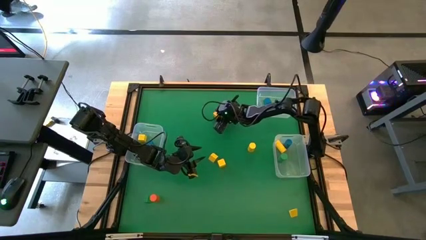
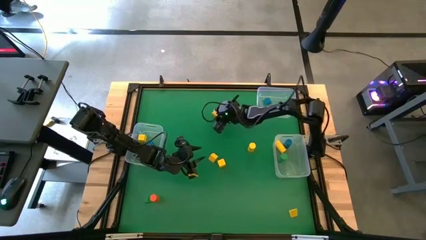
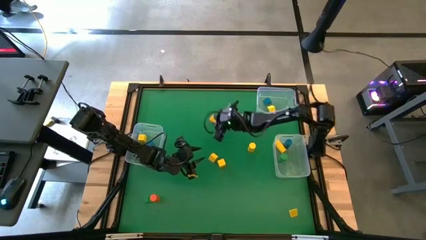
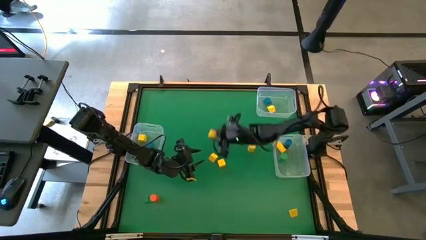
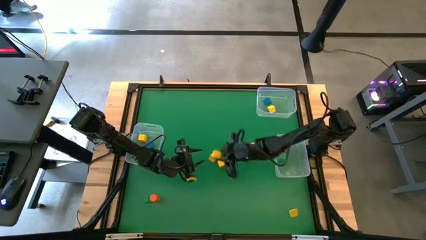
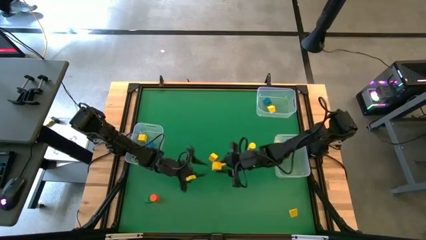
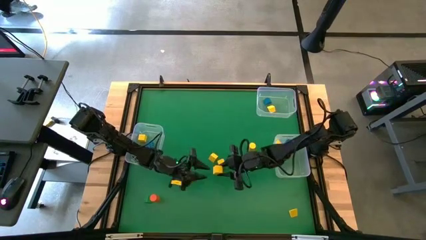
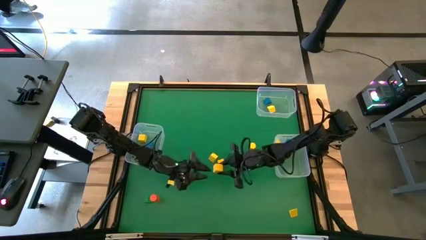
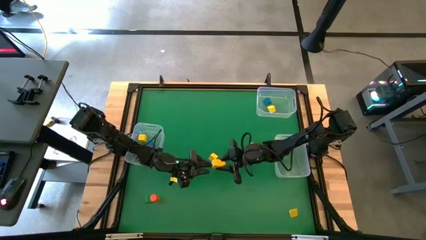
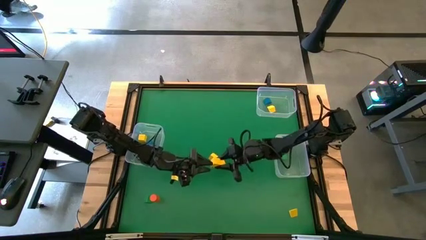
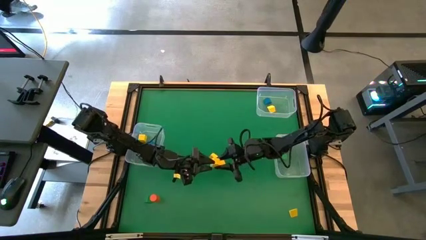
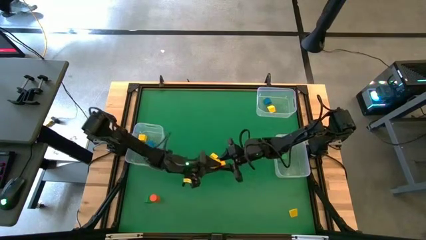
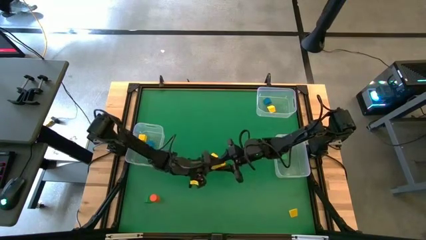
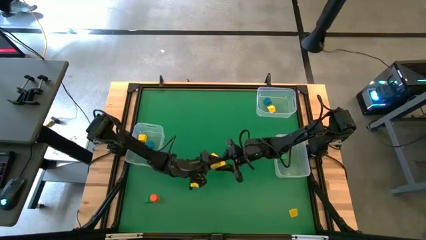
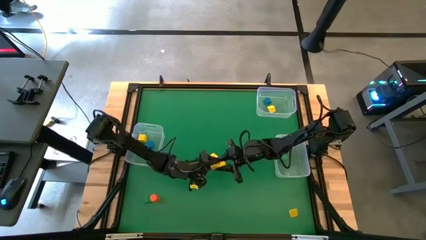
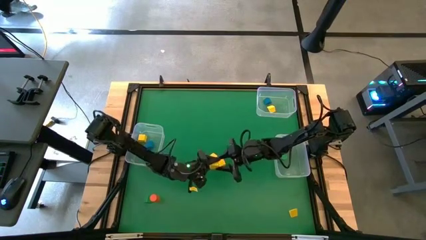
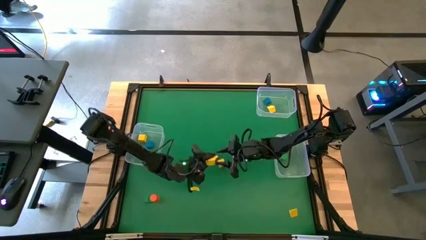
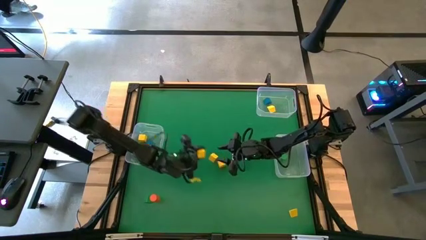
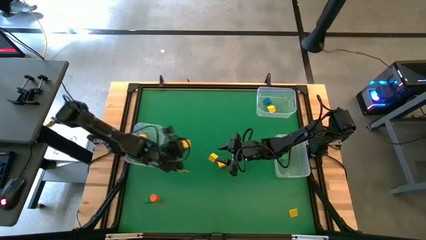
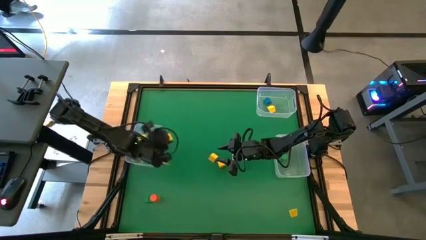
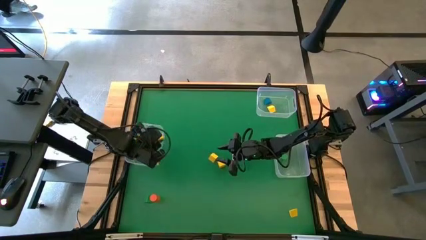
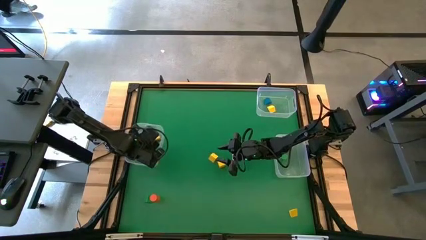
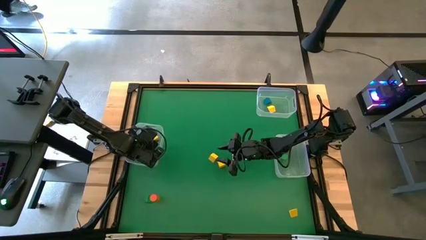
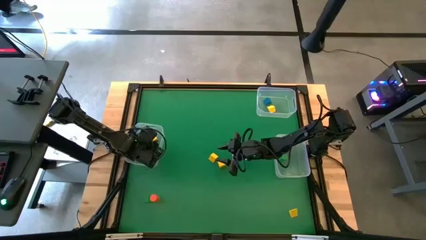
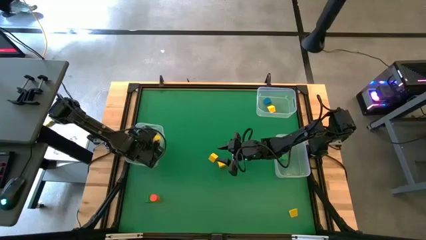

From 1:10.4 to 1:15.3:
Task: Sort blocks by size
Put the yellow square block into the left transparent bin

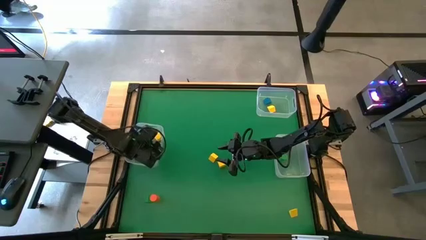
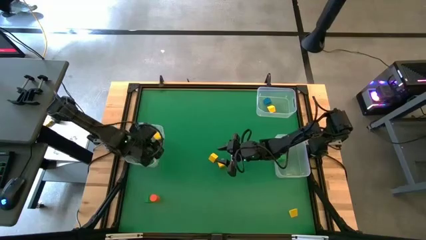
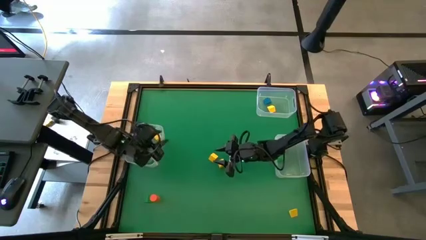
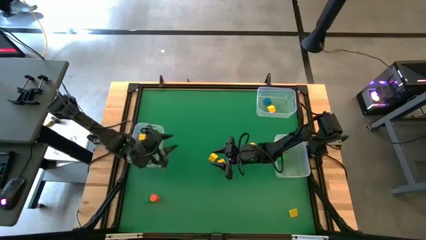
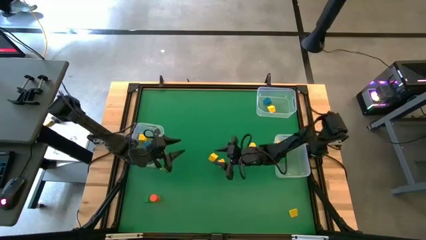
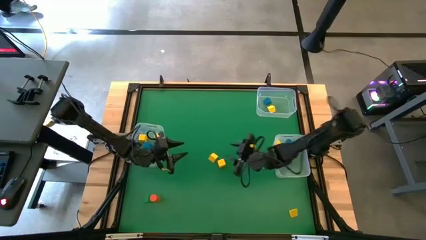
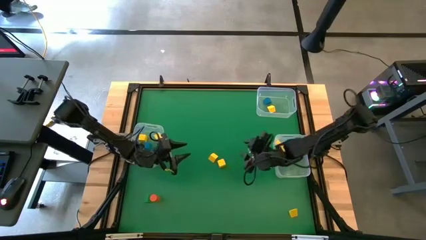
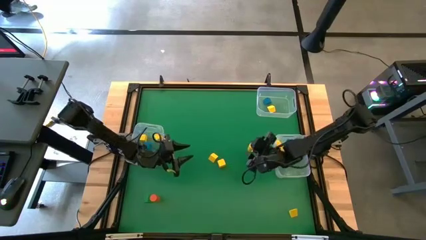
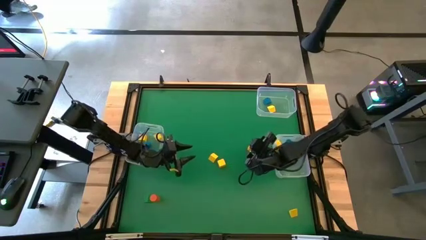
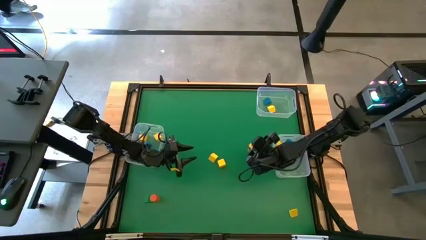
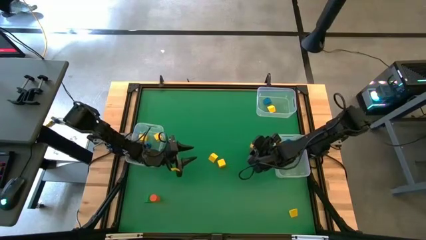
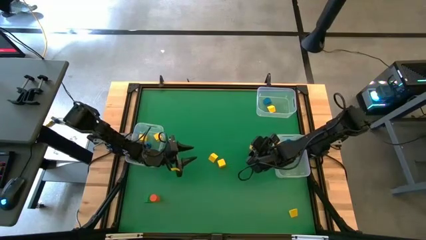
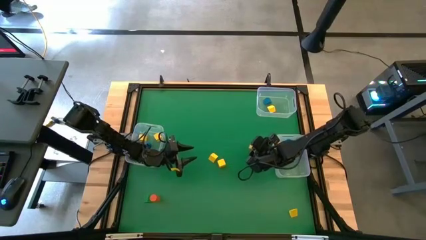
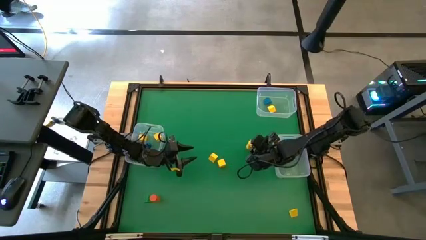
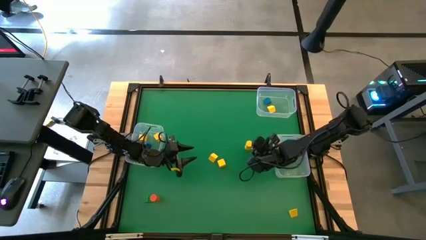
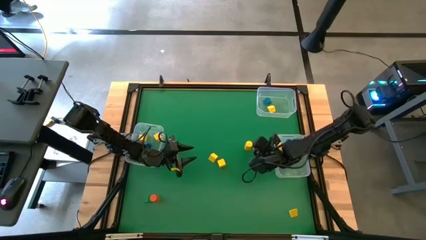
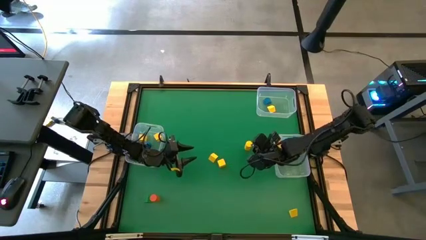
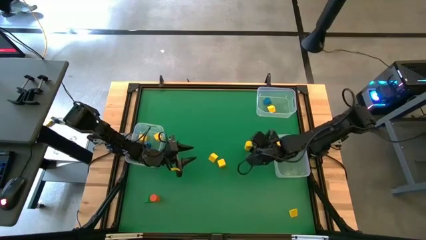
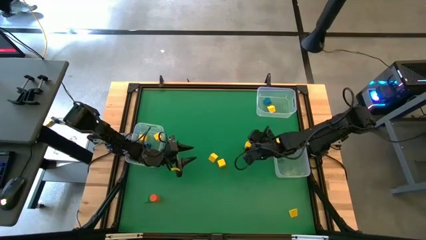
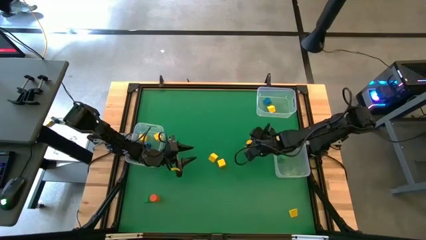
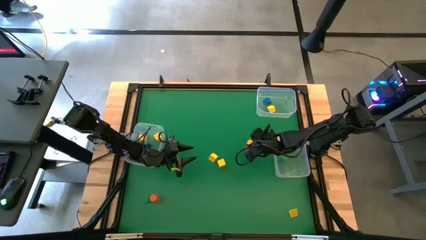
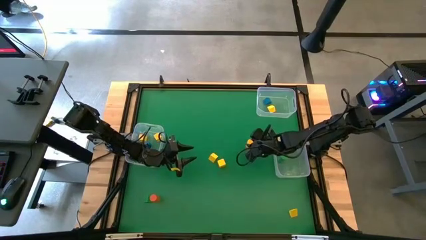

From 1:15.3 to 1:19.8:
Put the yellow cylindrical block into the bottom right transparent bin

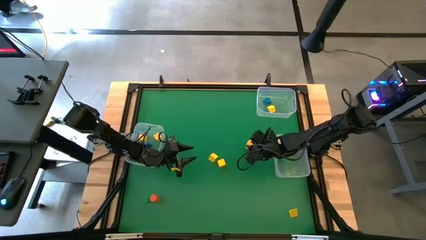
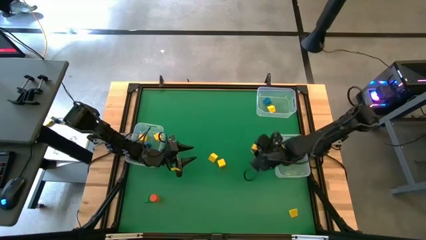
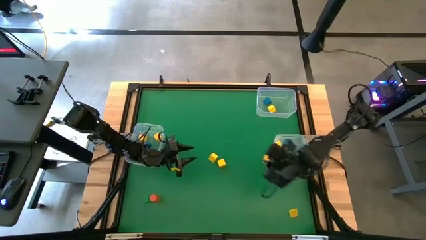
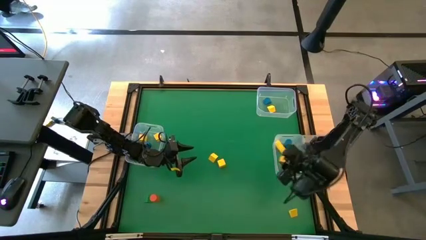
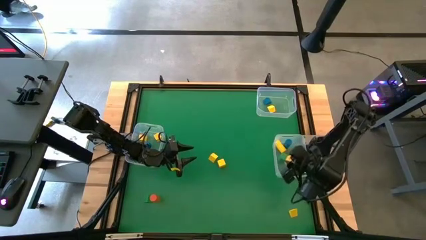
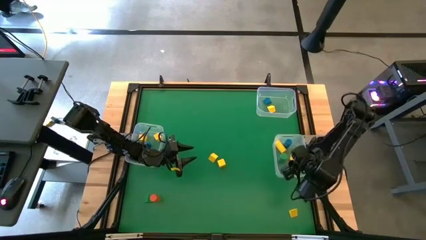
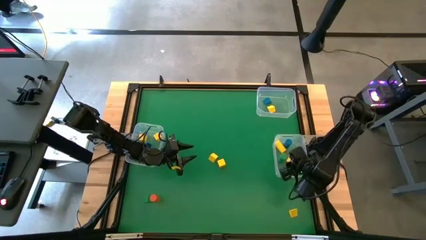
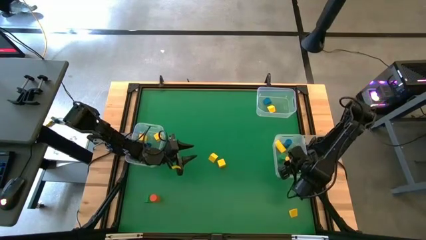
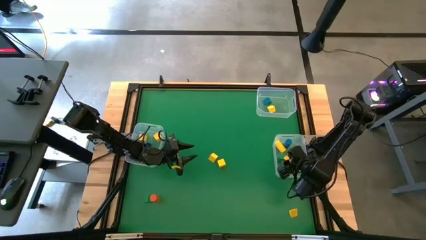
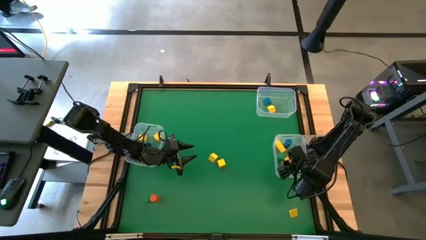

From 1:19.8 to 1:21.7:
Put the yellow cylindrical block into the bottom right transparent bin

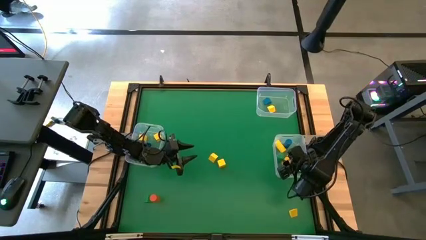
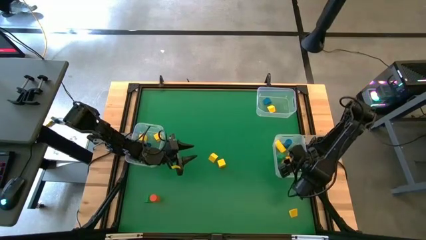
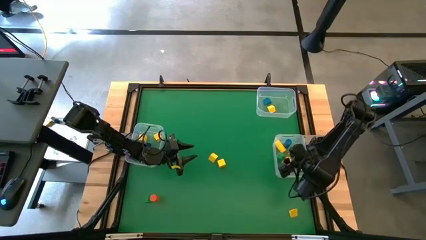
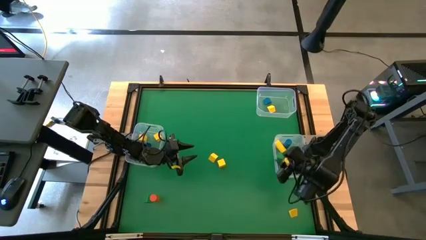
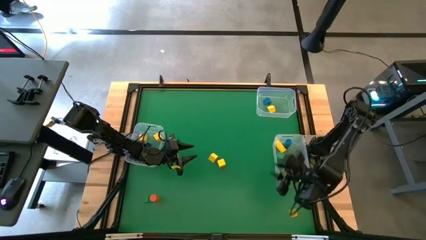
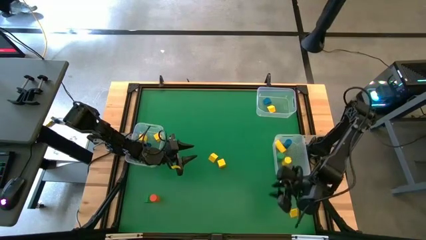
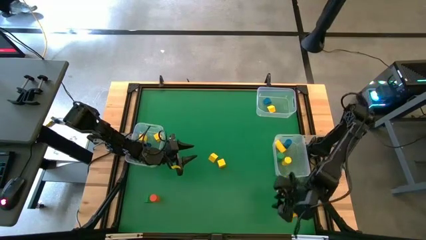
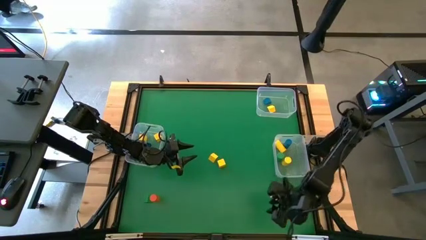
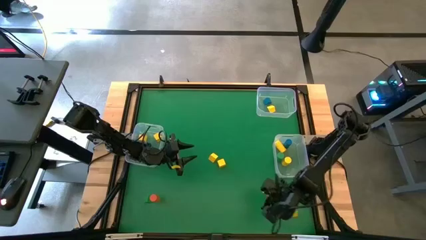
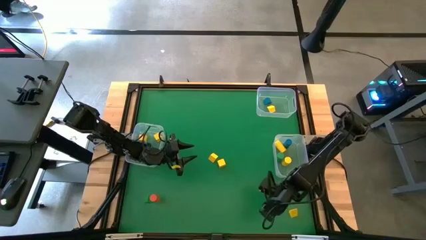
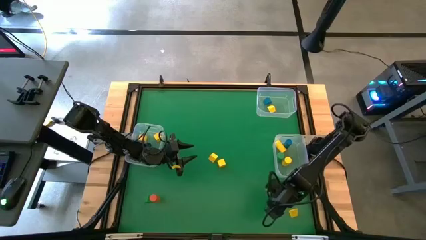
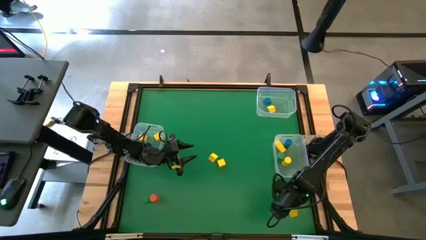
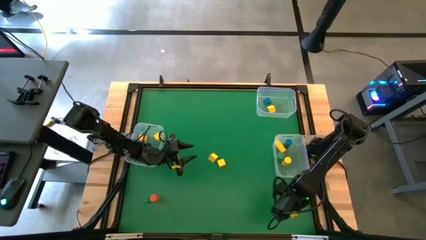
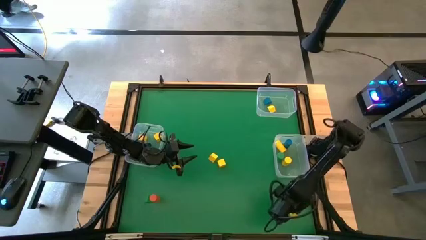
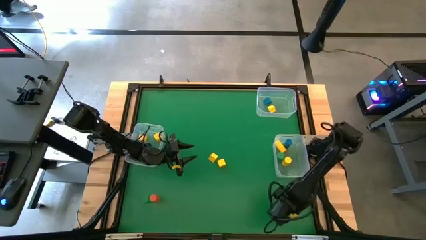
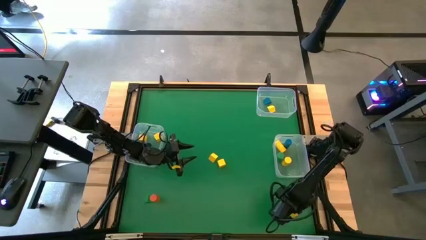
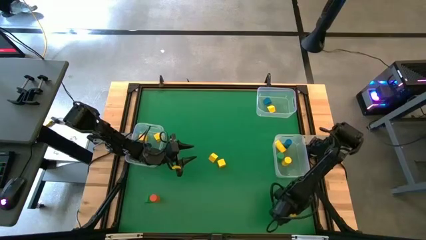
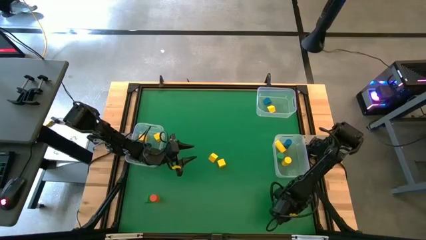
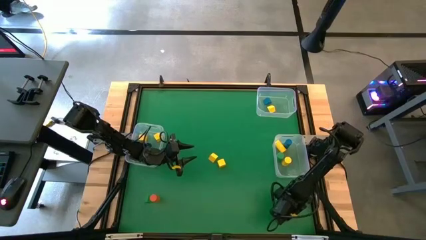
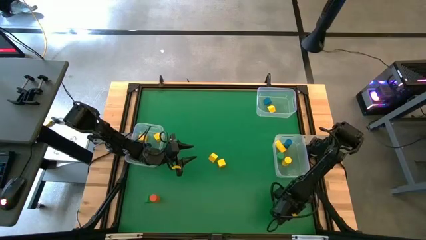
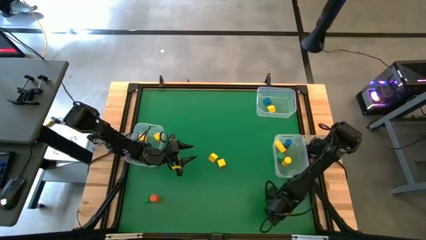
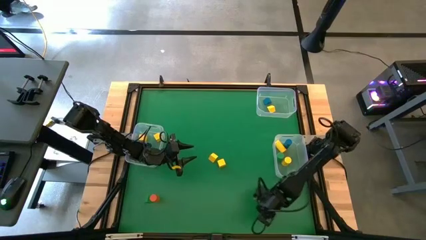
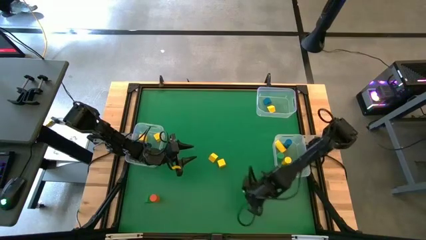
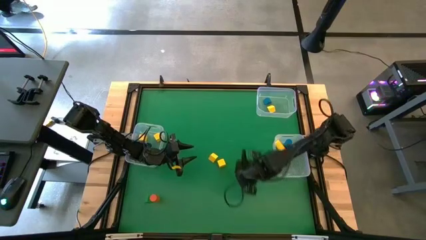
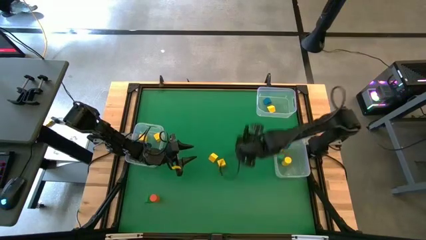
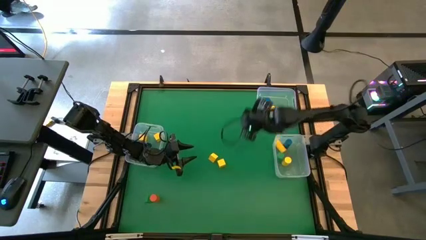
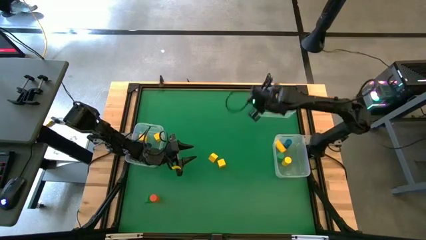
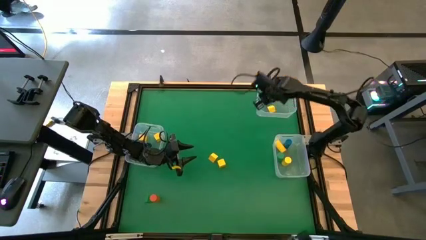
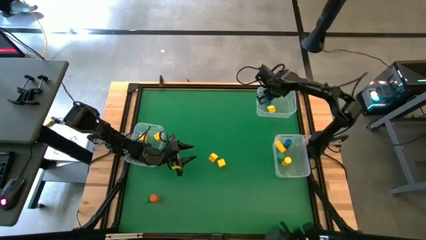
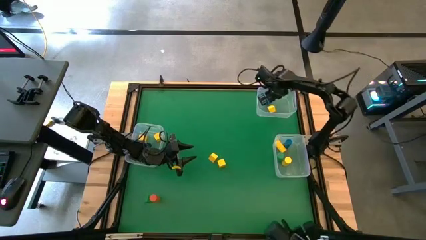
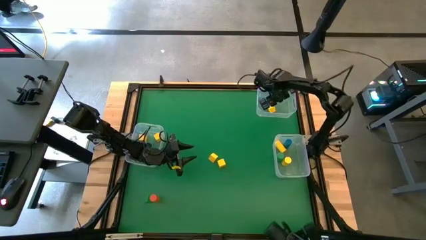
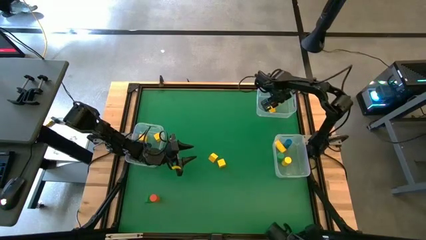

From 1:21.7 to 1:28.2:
Put the yellow triangle block into the top transparent bin
